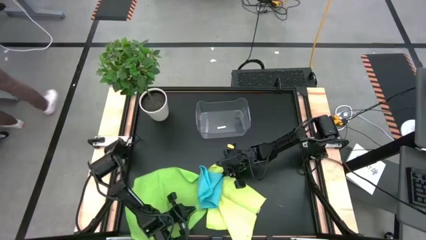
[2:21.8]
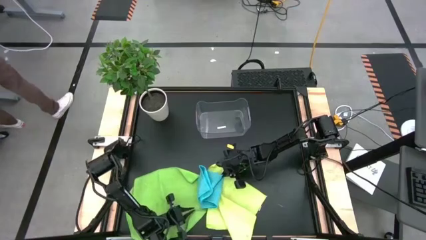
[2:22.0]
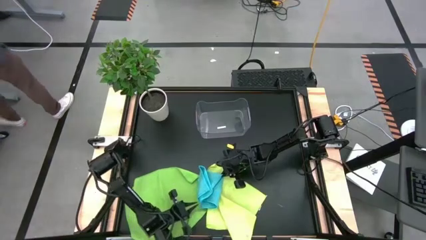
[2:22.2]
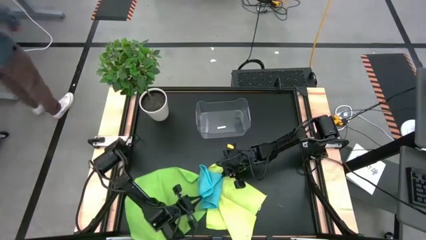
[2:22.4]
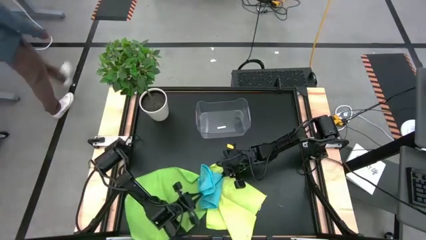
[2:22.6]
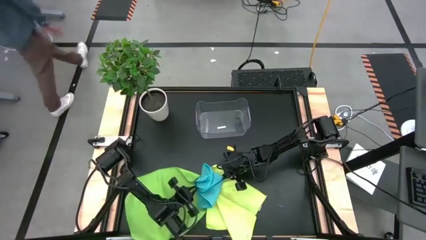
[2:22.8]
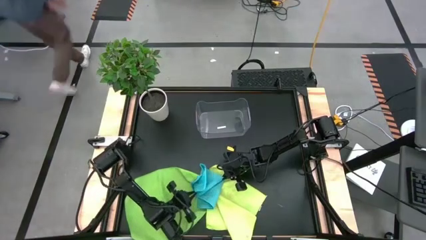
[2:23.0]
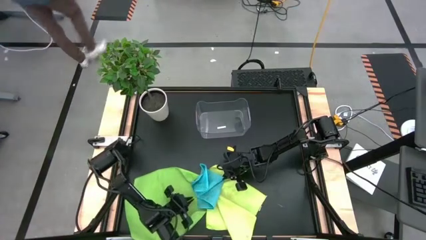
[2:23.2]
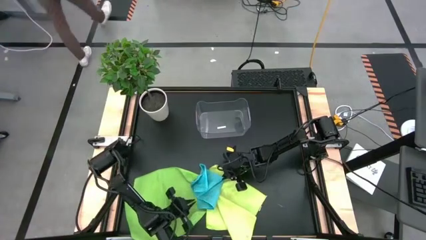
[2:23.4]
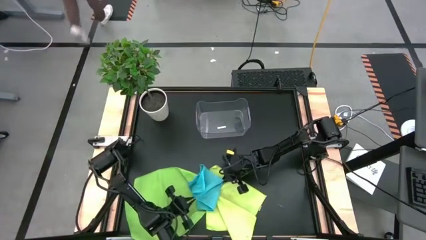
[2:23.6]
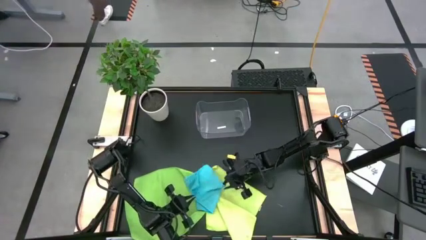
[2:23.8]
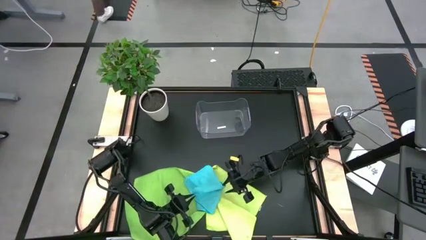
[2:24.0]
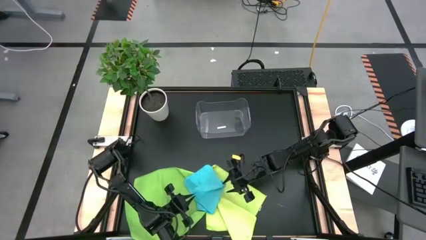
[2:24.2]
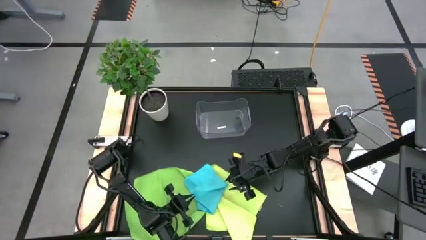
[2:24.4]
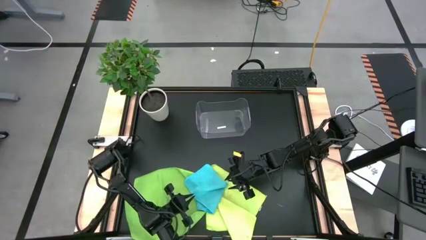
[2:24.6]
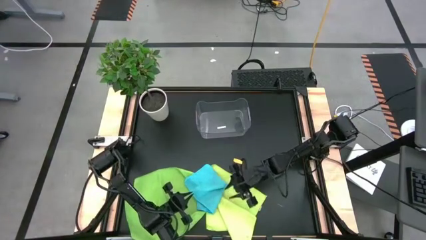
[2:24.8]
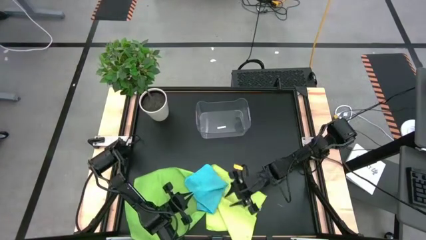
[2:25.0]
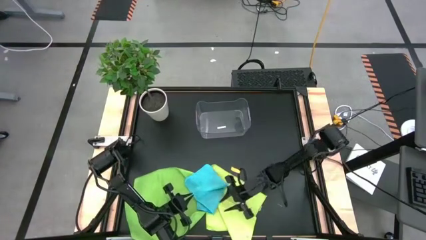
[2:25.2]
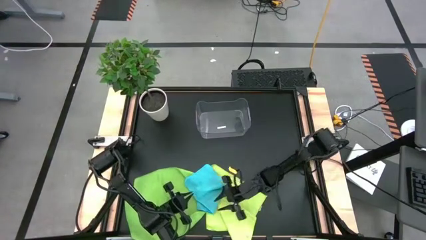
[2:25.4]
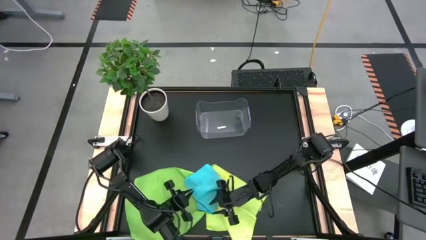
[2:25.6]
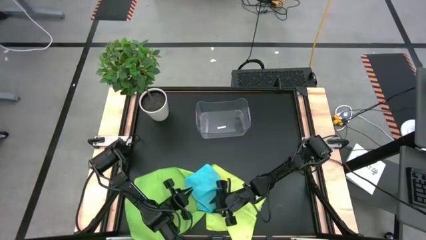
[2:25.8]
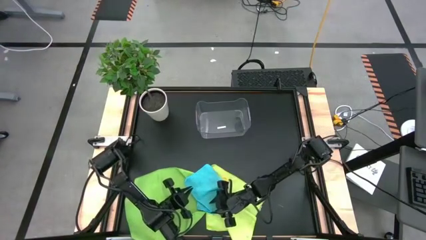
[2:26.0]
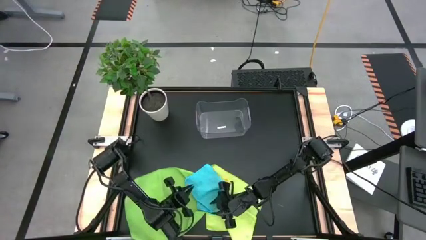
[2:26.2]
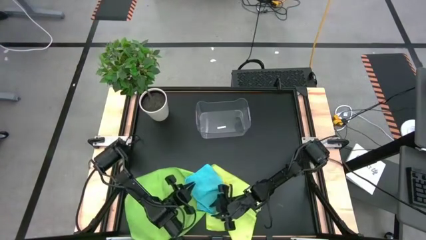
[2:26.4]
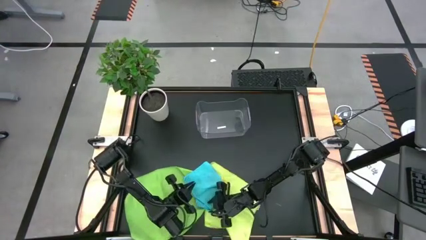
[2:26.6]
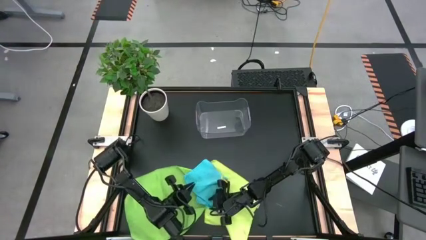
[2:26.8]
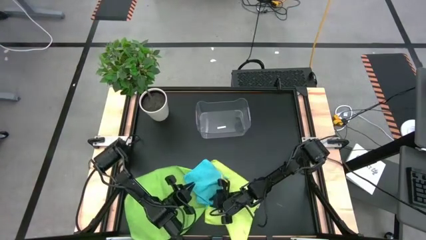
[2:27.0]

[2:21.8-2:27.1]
Task: Fold microfiber towels
Fold the blue towel

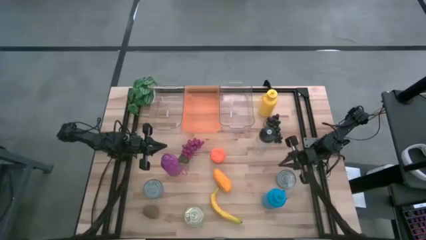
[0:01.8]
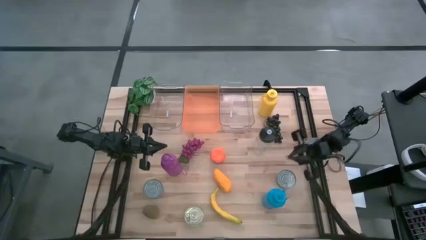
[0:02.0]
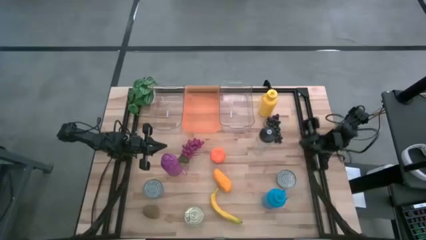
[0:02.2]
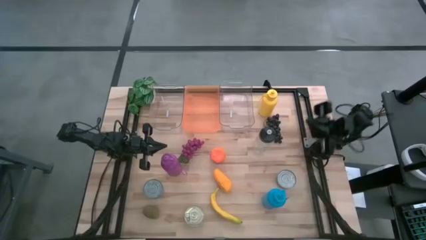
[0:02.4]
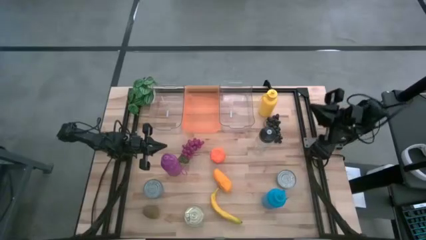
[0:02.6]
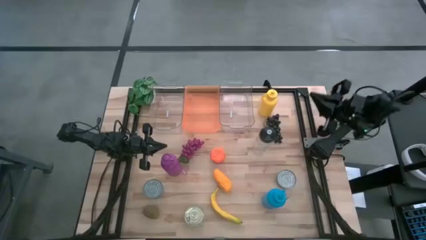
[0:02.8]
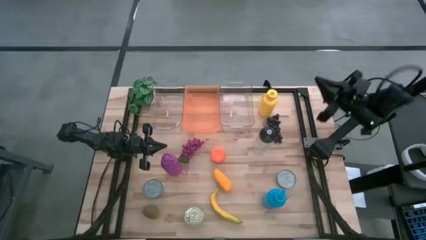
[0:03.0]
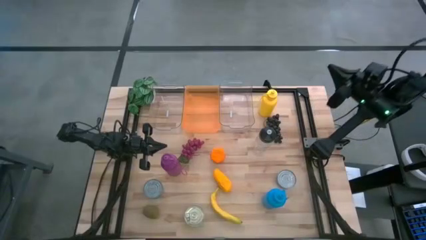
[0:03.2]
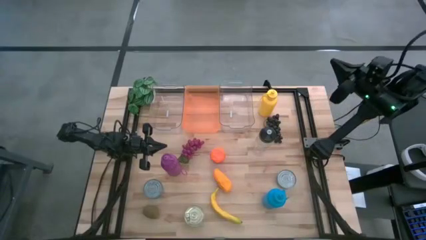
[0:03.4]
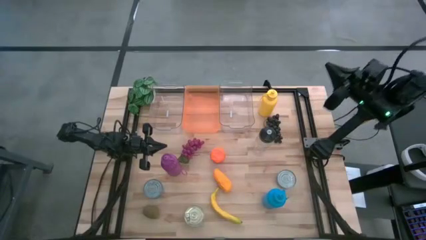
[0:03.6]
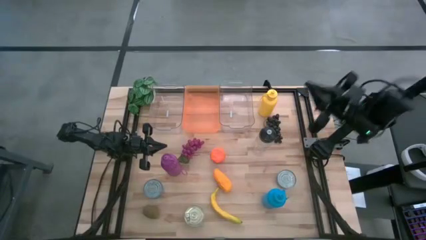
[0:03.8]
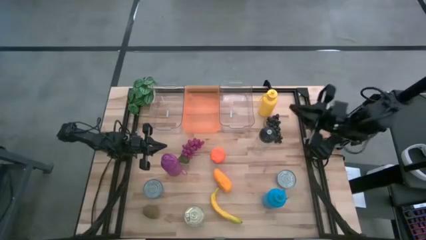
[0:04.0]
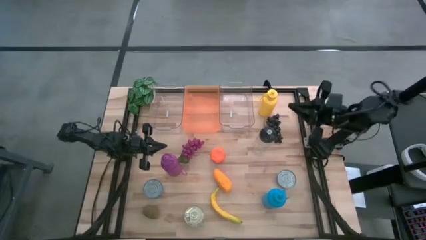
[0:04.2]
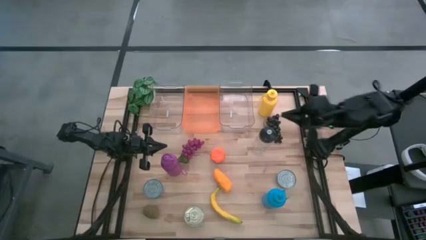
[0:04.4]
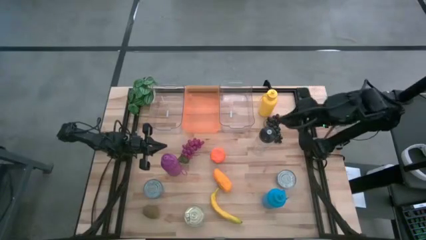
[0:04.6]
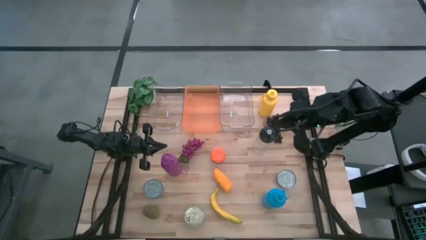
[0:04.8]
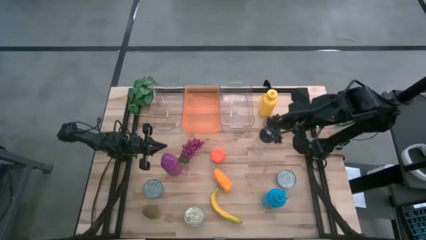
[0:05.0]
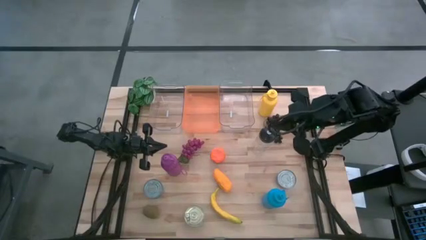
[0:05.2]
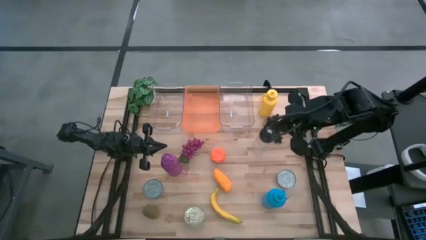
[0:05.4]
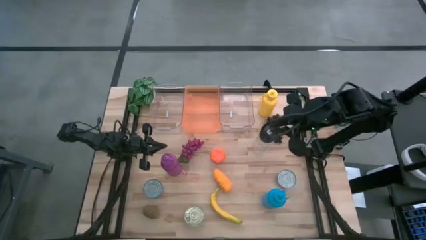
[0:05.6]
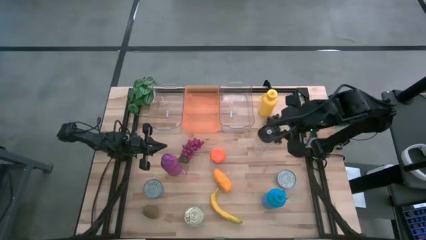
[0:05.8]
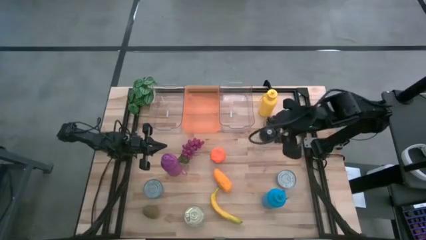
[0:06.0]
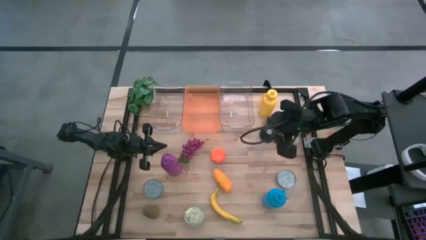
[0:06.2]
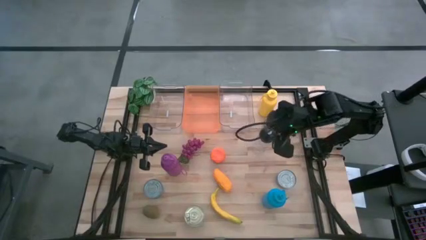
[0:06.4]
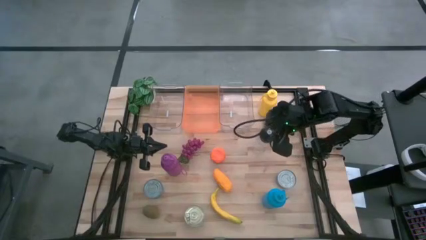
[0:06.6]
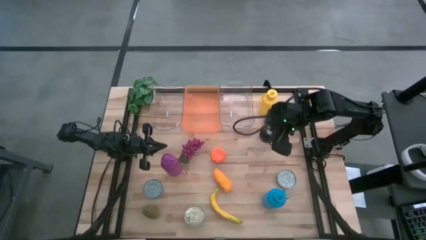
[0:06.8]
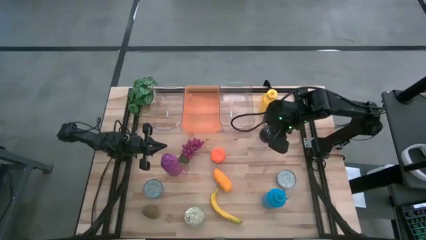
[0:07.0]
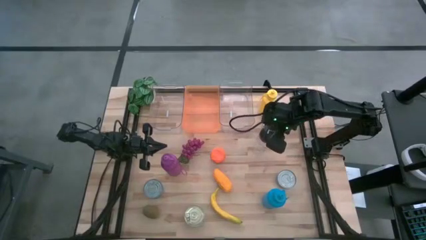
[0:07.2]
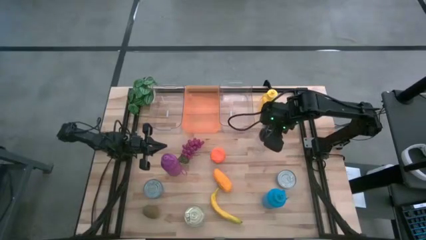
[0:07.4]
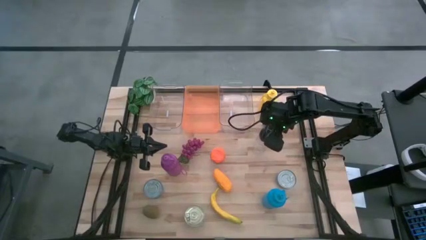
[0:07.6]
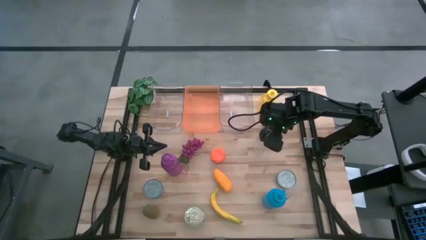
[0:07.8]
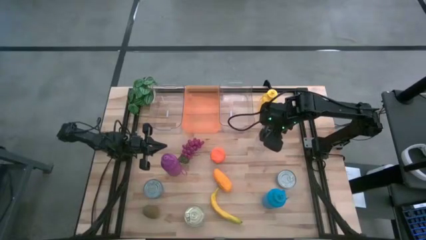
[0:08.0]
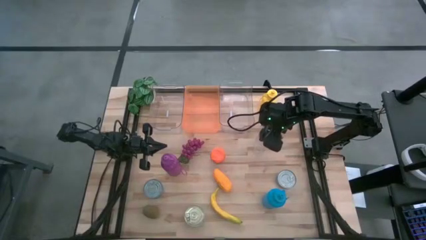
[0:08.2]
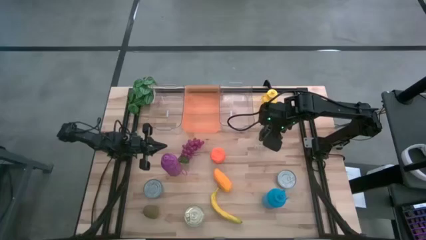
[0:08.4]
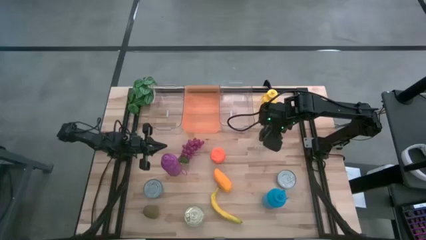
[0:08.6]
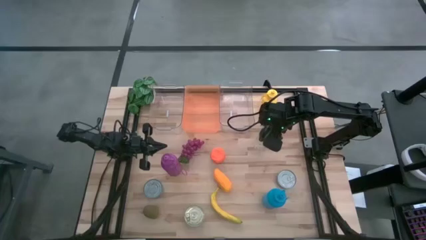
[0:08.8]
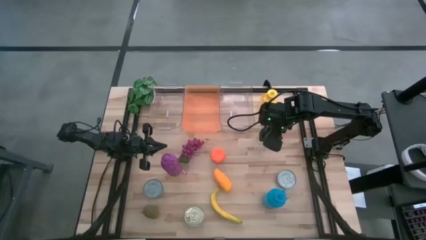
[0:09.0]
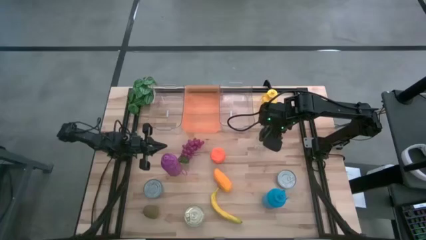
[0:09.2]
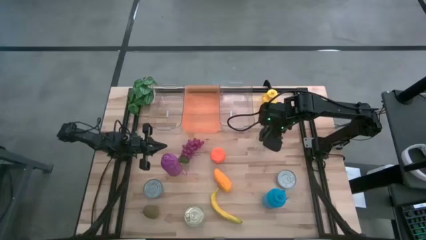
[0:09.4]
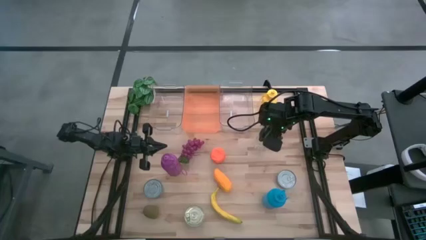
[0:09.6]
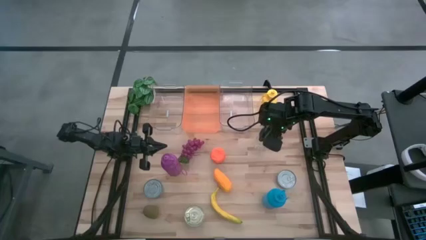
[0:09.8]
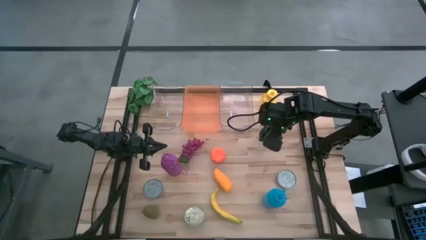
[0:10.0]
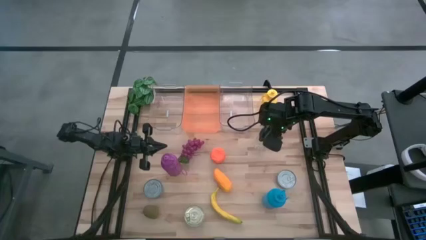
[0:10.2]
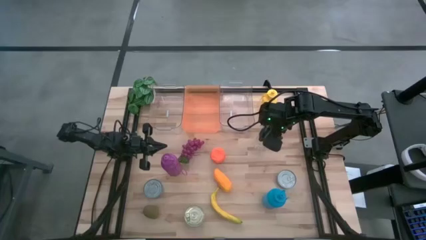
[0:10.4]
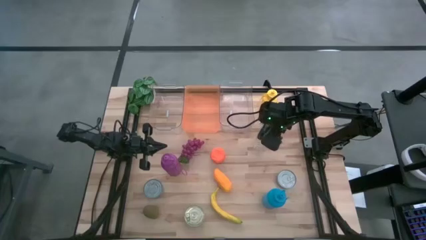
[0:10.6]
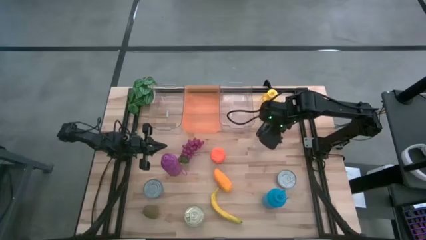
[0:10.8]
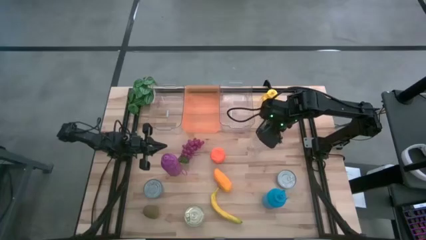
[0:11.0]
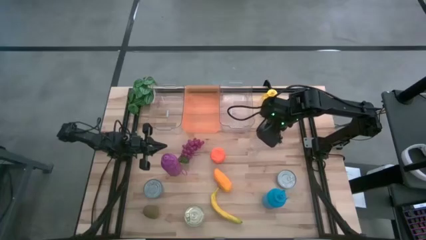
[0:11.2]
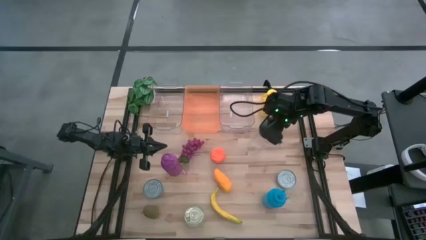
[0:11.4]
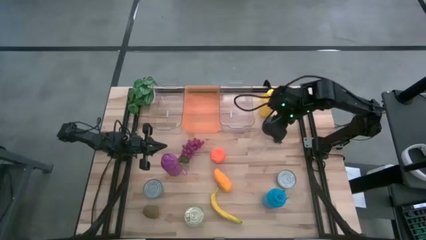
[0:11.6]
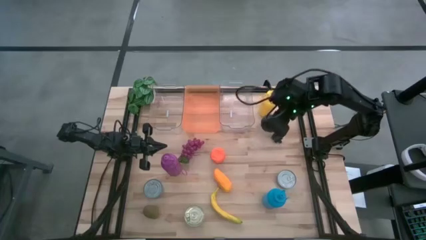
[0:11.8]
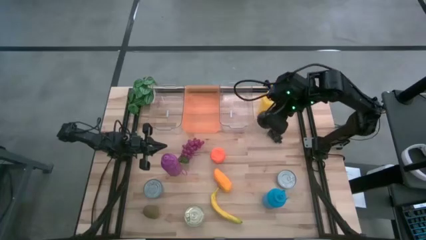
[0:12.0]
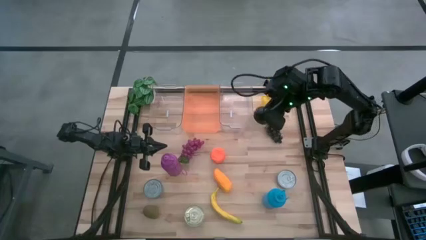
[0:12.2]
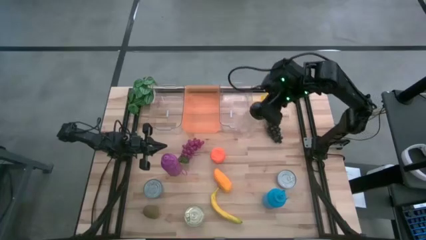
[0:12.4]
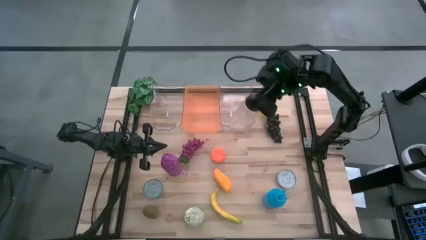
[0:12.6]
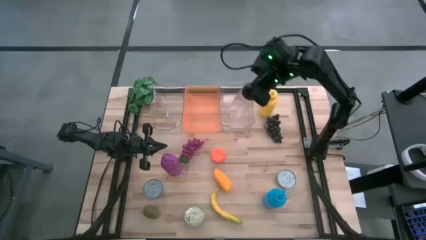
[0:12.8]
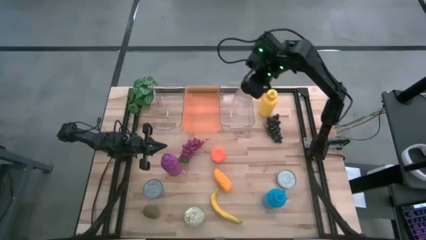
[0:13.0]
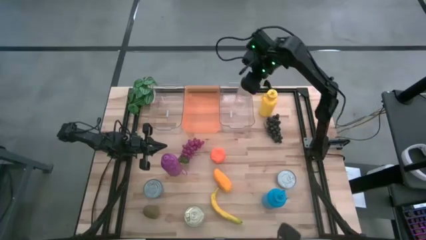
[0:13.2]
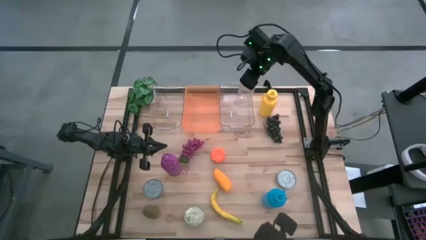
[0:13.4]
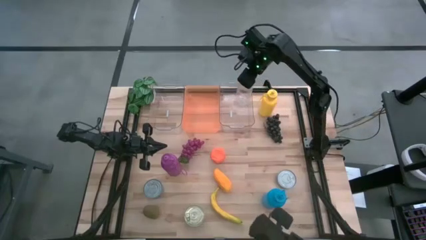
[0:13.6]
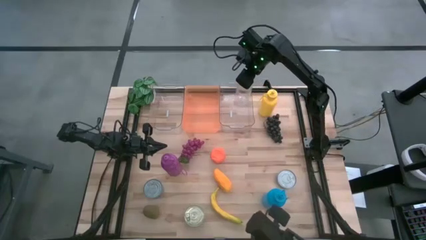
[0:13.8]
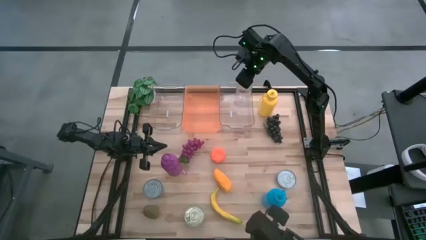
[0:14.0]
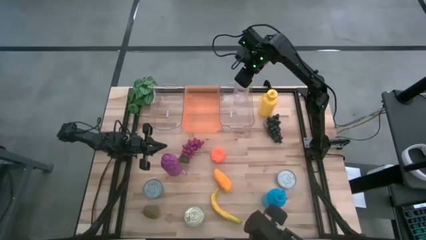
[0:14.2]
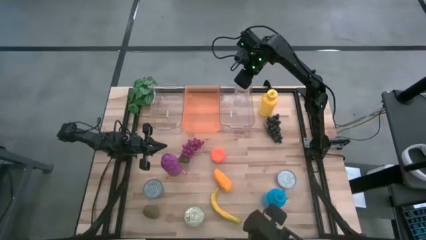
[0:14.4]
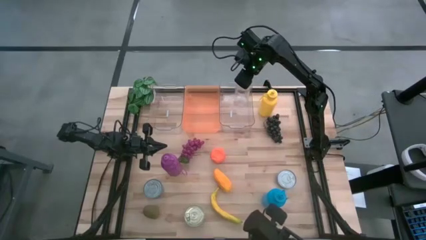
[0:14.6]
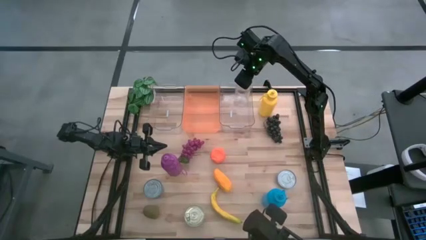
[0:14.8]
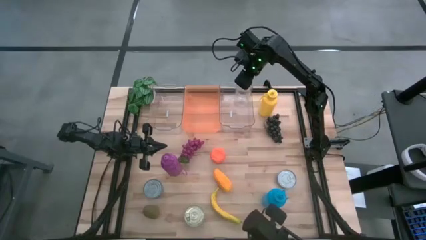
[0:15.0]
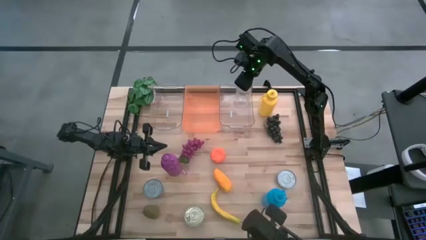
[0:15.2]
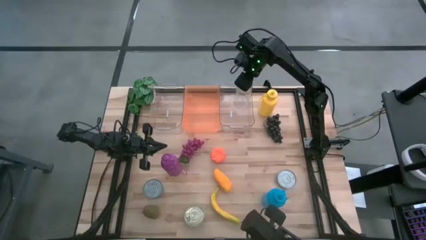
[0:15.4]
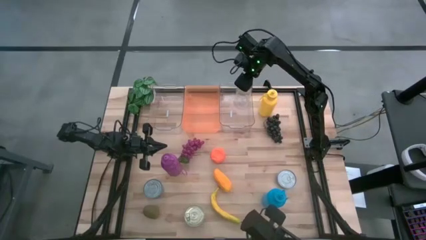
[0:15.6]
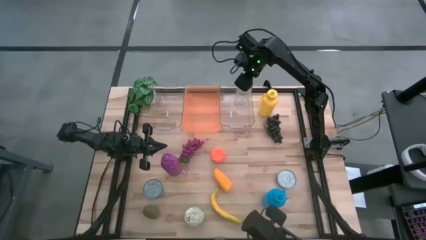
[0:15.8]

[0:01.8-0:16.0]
Task: Pick & Place Food Item
Put the transparent water bottle into the right transparent bin
